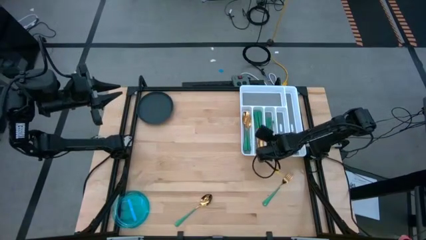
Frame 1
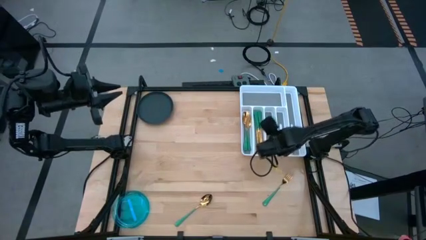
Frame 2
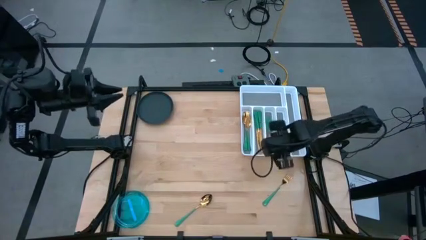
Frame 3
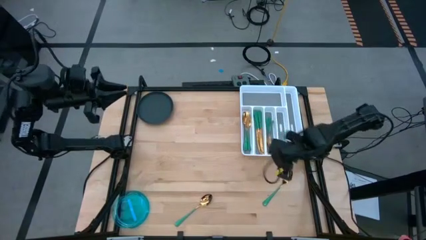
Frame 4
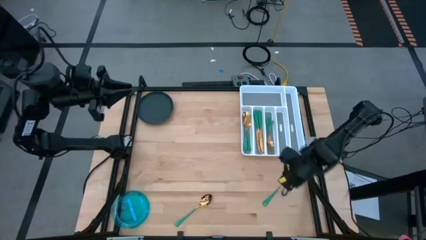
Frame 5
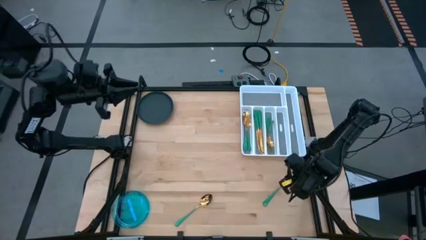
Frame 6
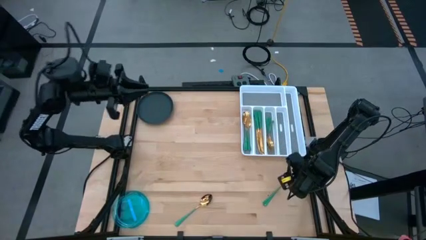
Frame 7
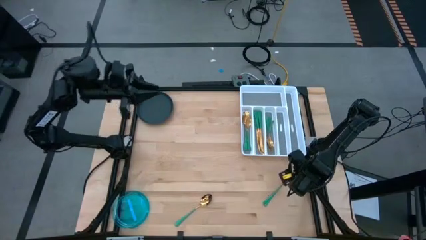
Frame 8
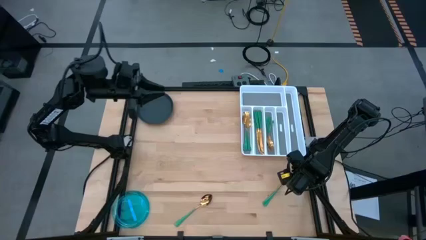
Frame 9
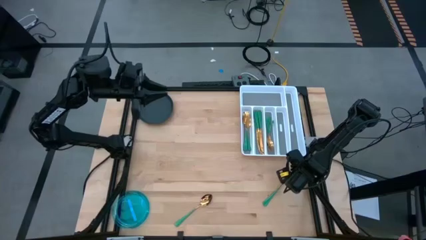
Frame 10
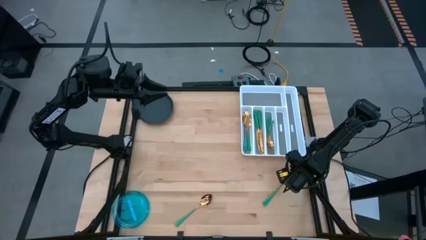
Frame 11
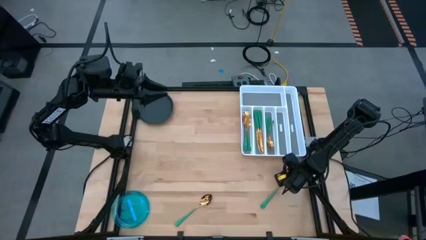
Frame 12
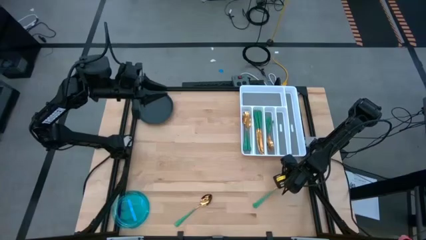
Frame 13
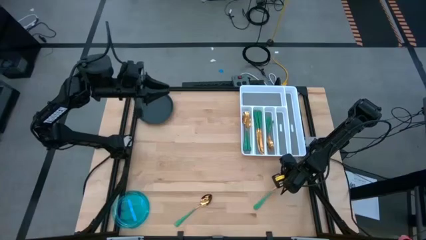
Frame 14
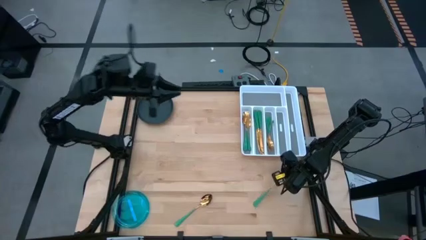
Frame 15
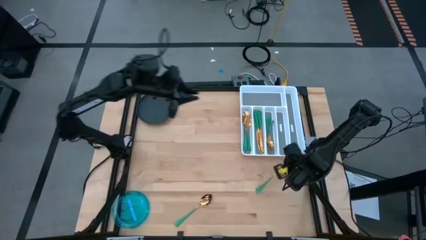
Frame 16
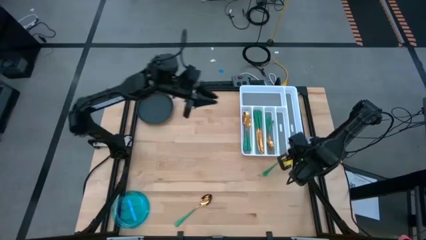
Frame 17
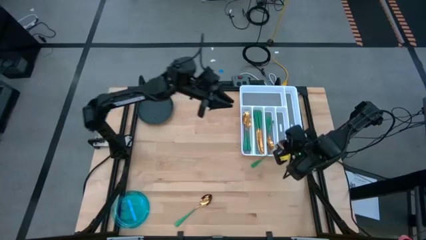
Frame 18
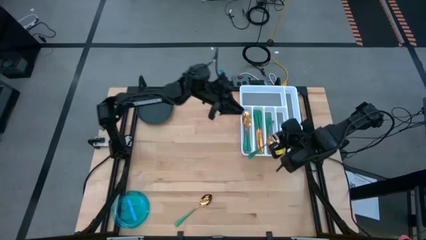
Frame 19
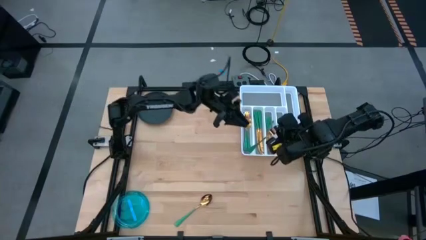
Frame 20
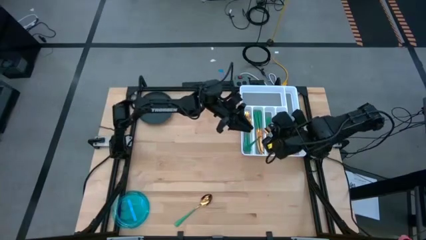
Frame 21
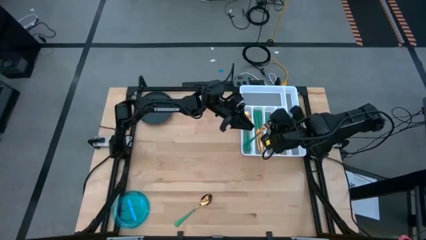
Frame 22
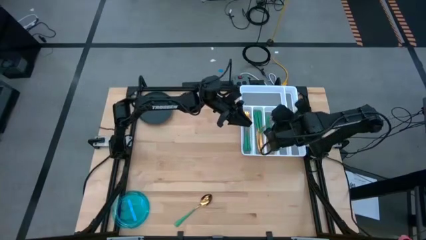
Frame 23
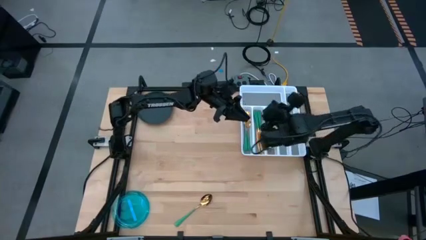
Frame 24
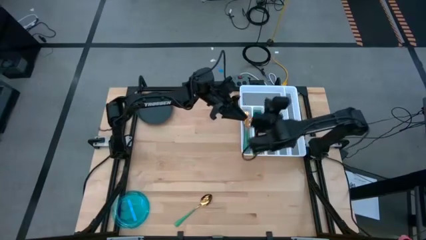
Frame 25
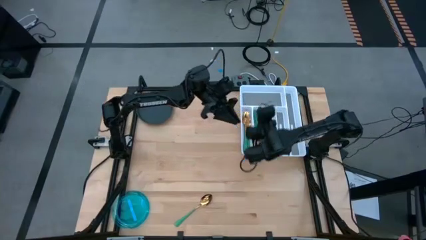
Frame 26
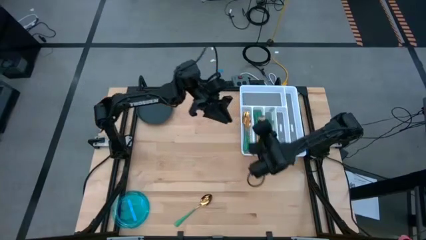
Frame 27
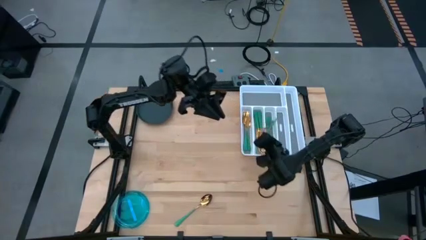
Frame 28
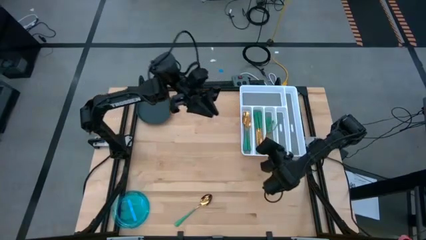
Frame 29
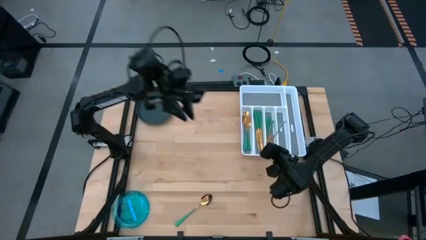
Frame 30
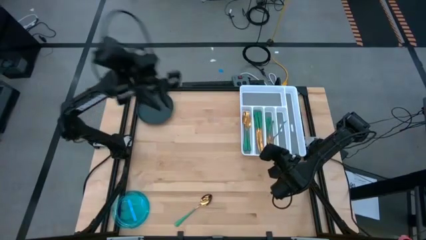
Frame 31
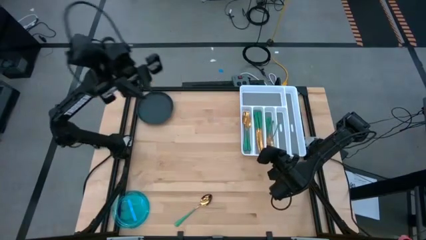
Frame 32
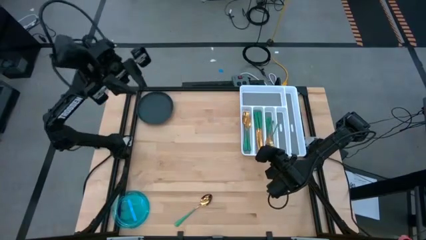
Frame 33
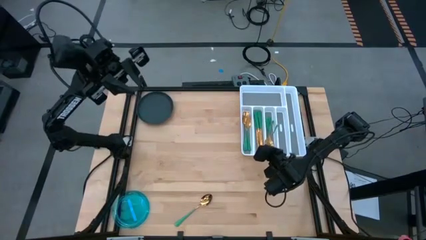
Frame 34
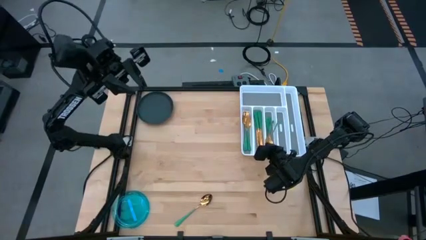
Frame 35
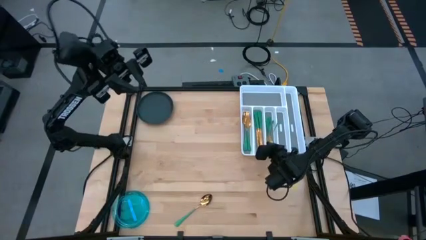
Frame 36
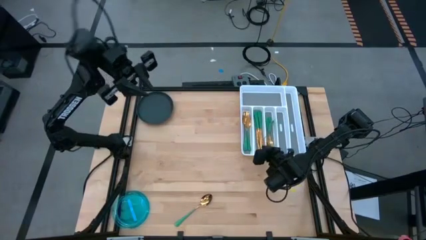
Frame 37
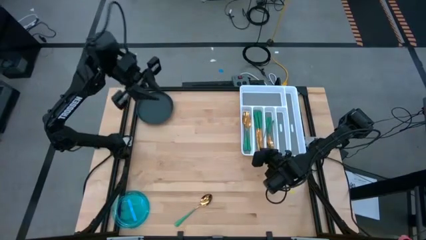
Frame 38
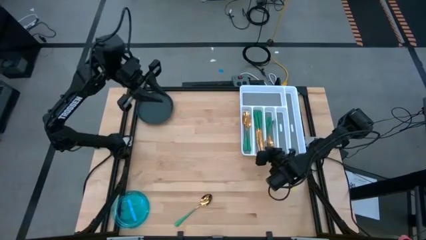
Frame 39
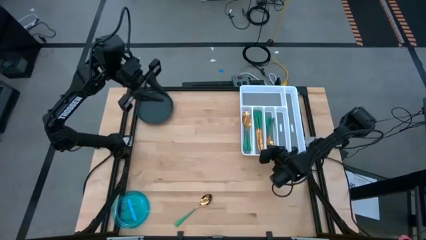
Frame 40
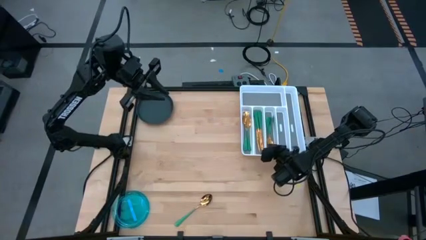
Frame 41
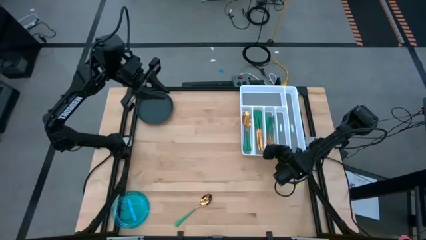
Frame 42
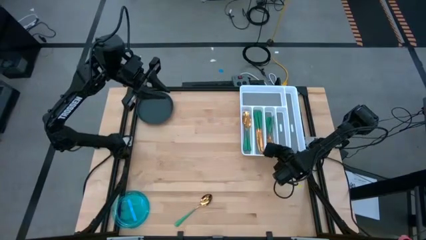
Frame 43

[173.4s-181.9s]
Task: Sort silverware
Put the green fork into the silverware tray

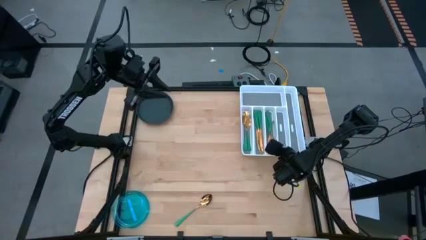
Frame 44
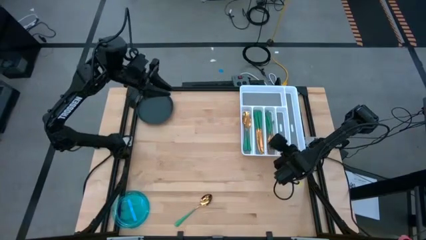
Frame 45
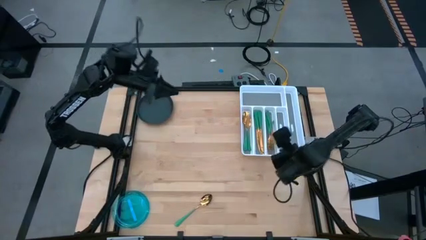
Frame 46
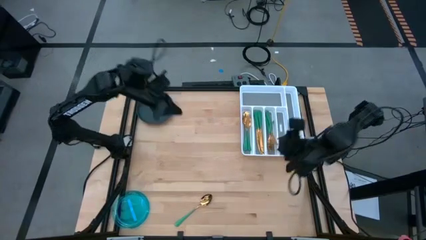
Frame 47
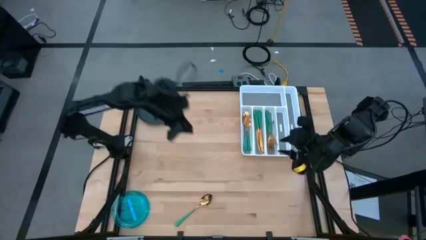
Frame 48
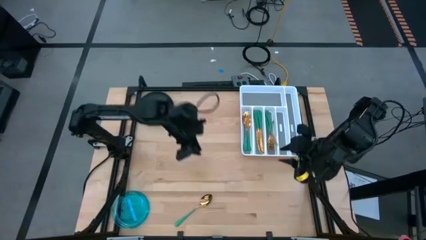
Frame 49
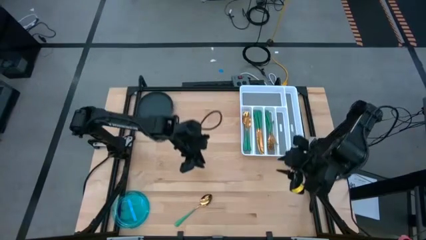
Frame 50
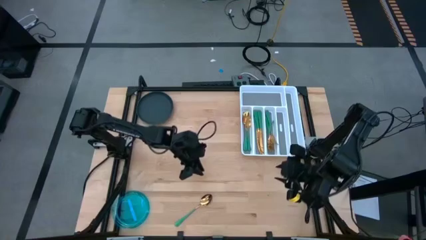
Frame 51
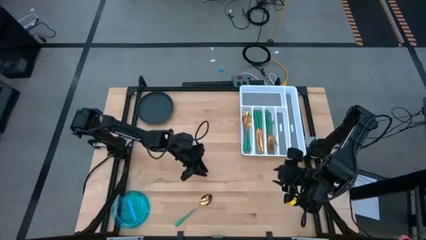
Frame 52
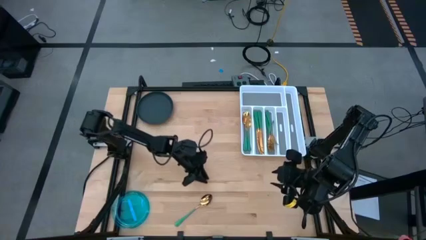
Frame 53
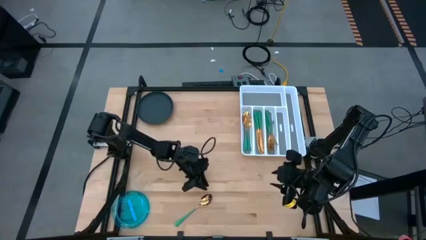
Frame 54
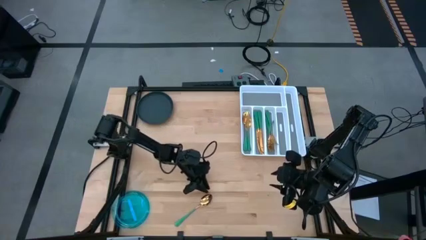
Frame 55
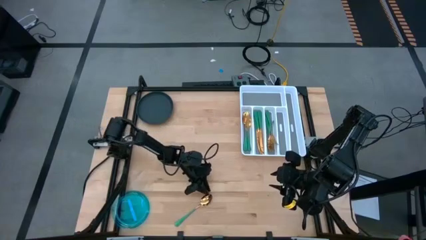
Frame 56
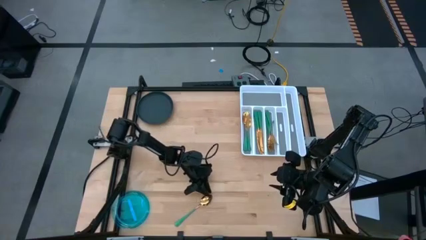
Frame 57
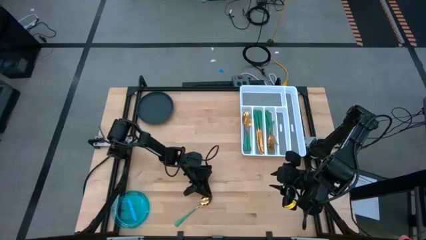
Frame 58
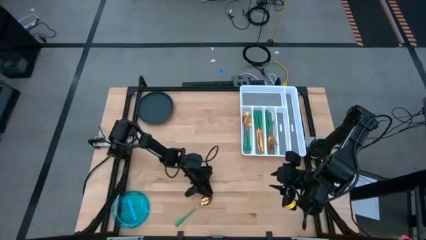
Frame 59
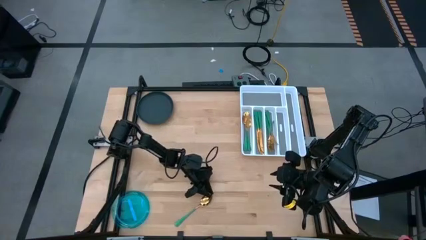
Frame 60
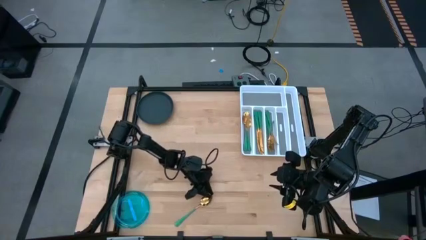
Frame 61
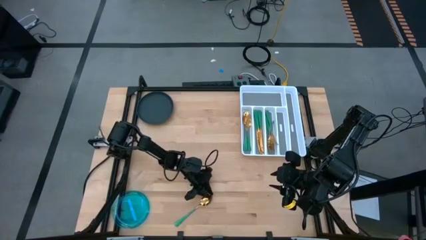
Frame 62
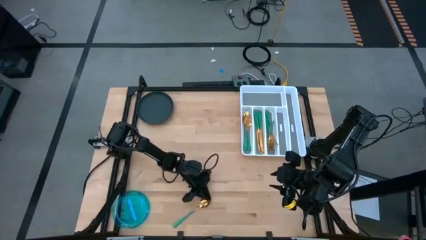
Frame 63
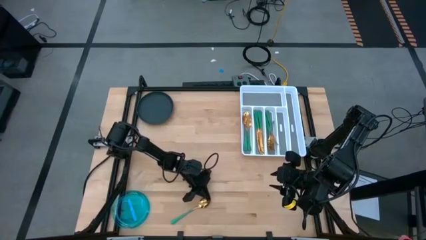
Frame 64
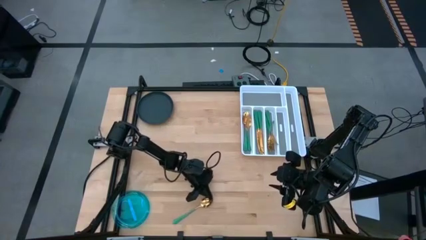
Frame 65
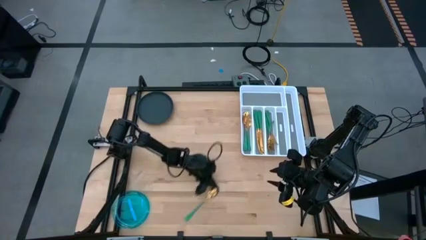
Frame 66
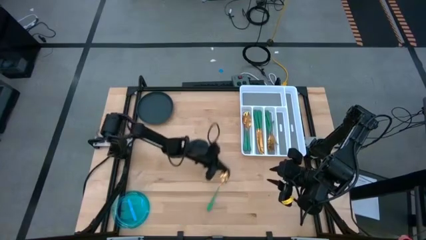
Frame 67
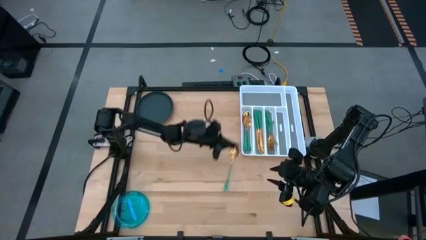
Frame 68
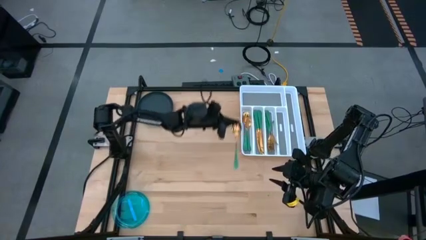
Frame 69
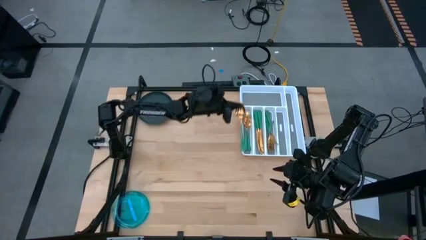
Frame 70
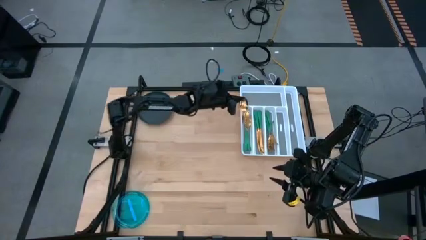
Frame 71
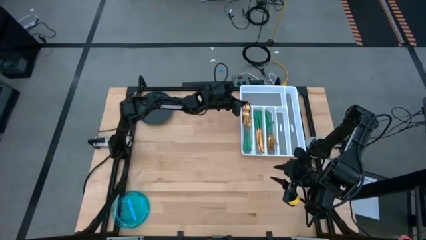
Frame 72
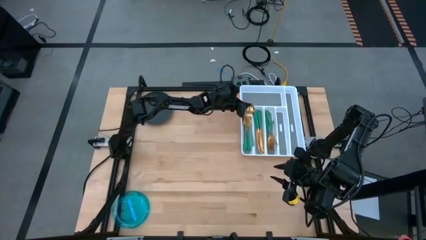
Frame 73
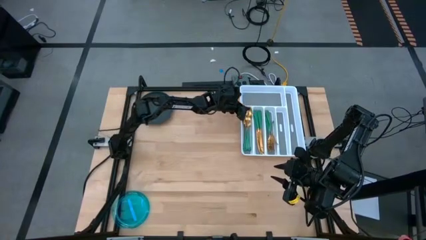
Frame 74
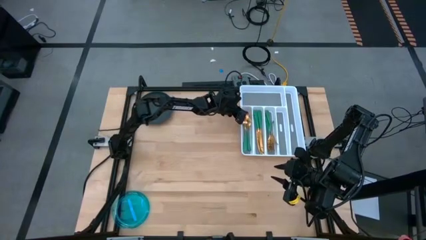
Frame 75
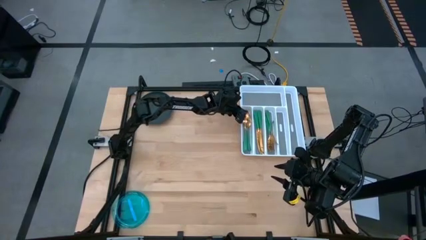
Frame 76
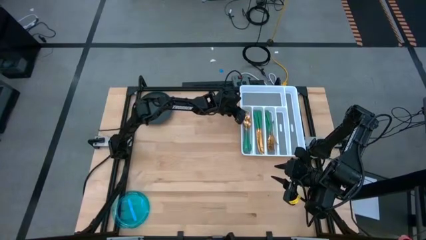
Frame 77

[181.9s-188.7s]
Put the green spoon into the silverware tray
